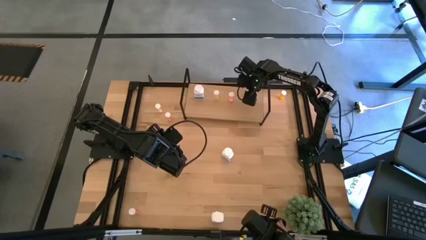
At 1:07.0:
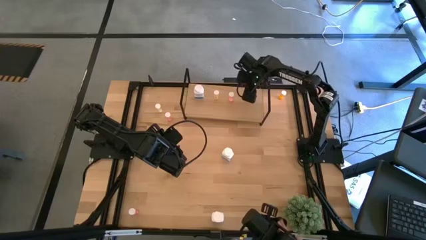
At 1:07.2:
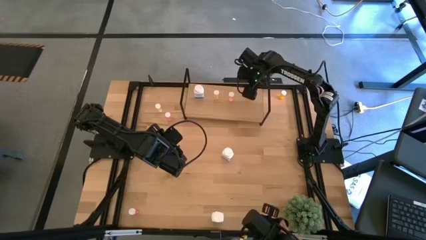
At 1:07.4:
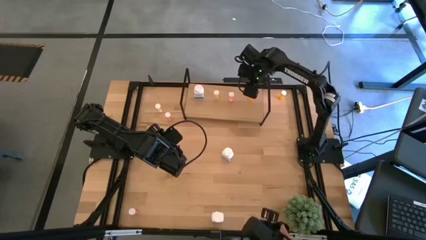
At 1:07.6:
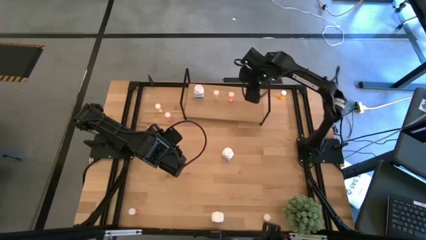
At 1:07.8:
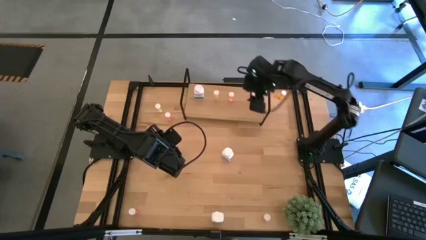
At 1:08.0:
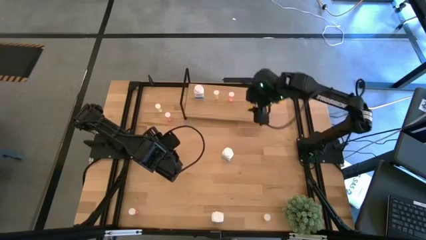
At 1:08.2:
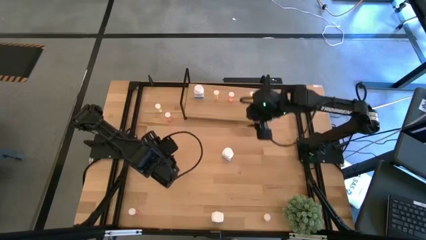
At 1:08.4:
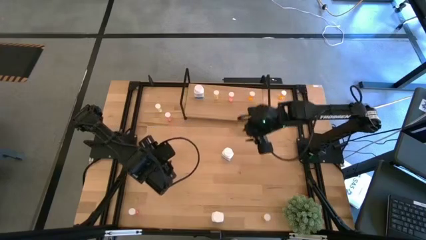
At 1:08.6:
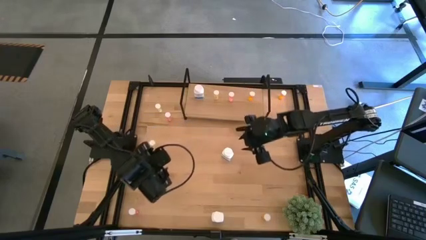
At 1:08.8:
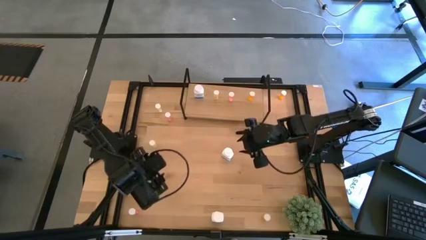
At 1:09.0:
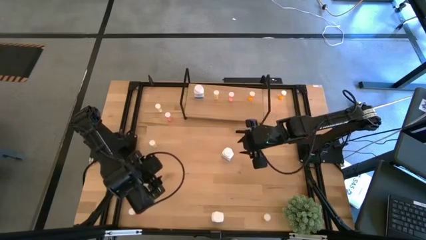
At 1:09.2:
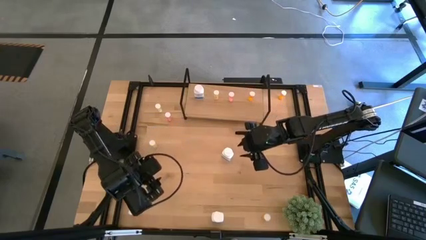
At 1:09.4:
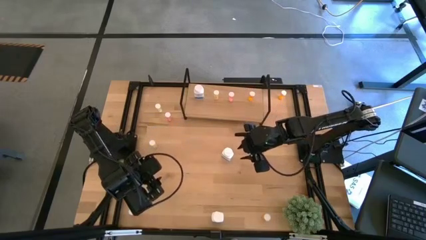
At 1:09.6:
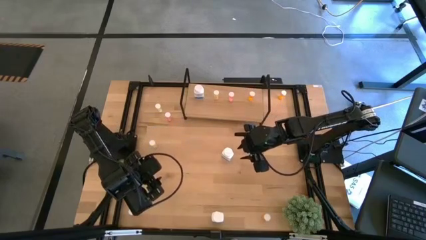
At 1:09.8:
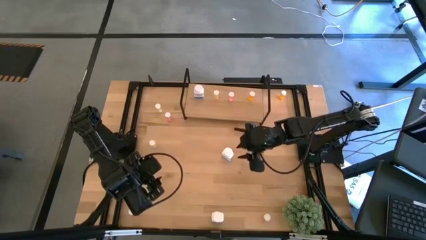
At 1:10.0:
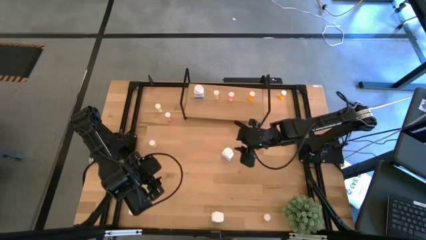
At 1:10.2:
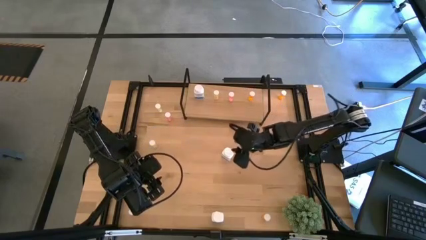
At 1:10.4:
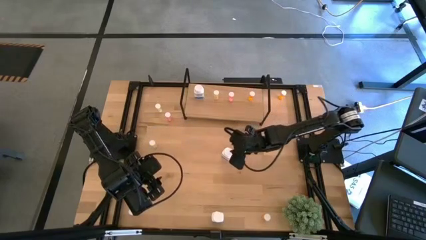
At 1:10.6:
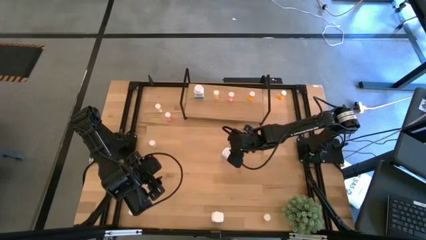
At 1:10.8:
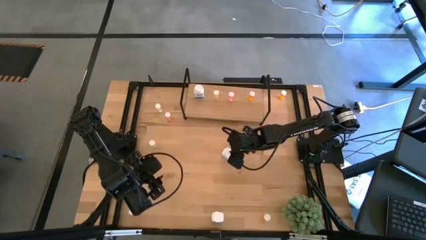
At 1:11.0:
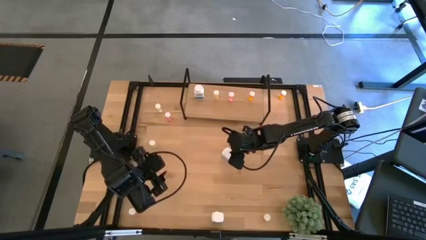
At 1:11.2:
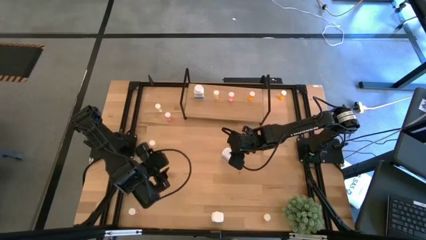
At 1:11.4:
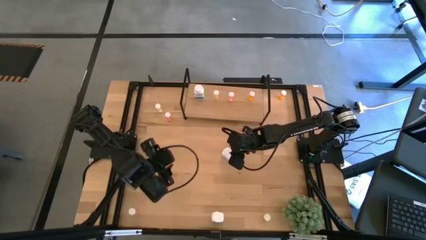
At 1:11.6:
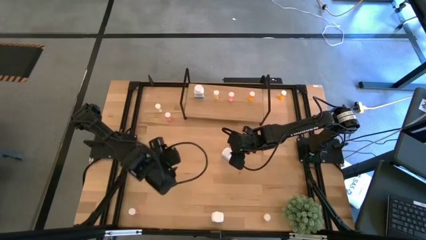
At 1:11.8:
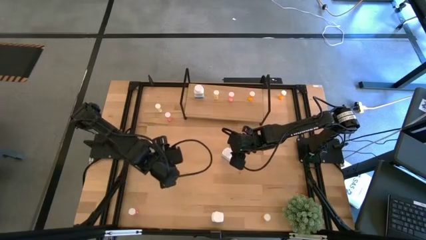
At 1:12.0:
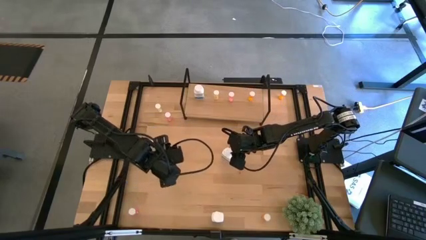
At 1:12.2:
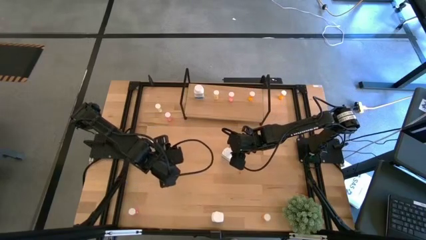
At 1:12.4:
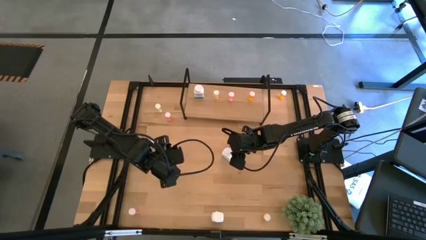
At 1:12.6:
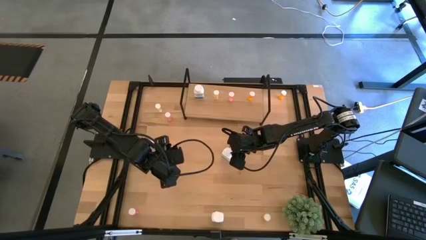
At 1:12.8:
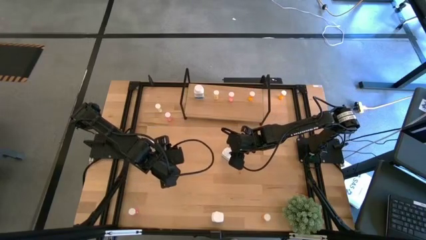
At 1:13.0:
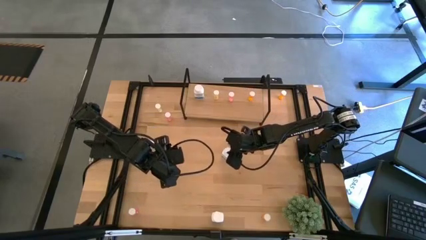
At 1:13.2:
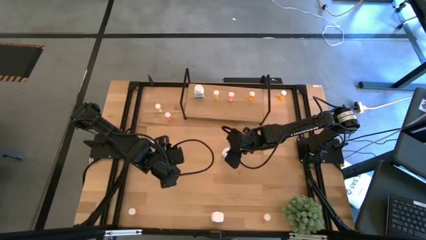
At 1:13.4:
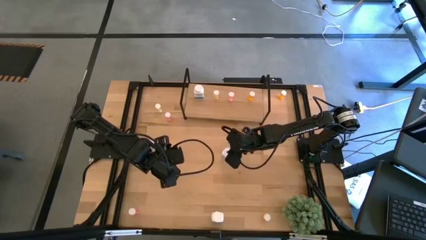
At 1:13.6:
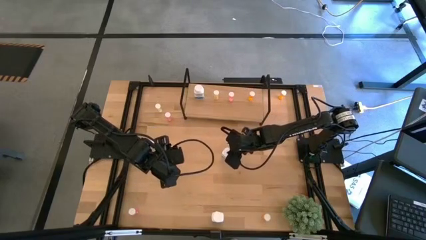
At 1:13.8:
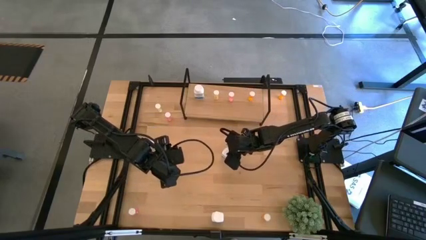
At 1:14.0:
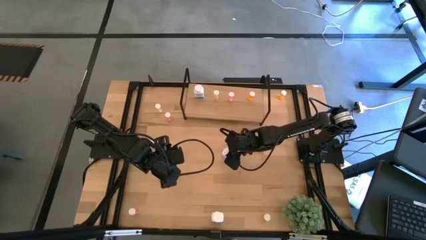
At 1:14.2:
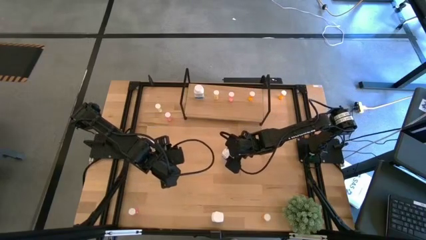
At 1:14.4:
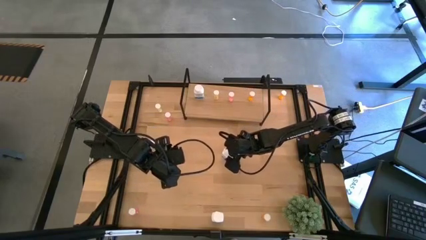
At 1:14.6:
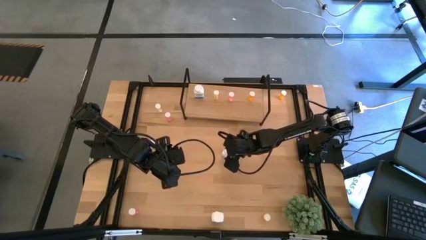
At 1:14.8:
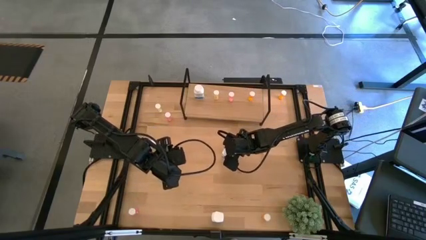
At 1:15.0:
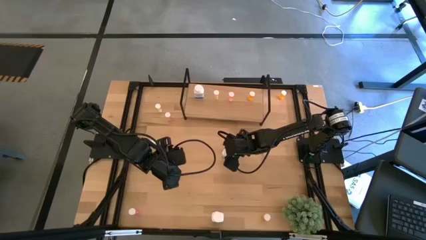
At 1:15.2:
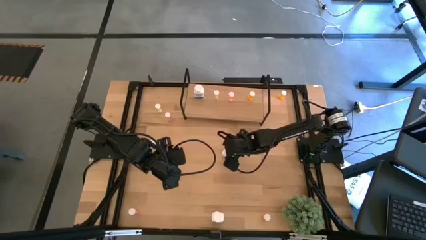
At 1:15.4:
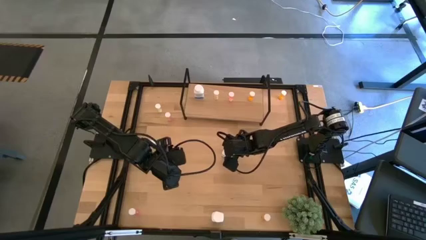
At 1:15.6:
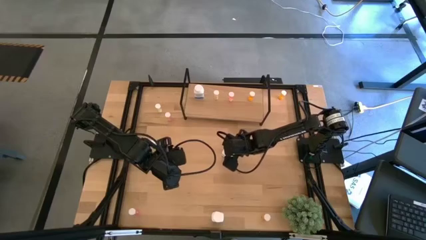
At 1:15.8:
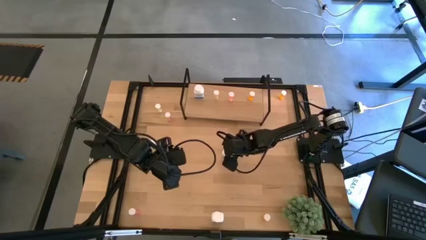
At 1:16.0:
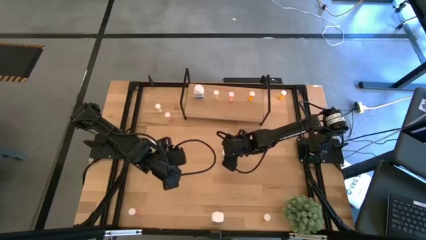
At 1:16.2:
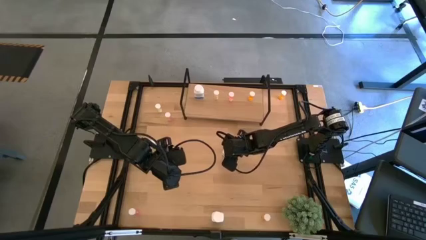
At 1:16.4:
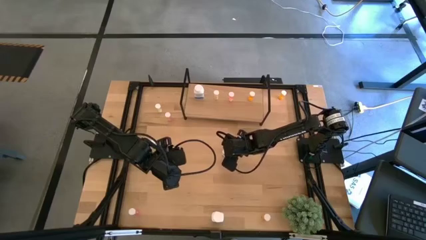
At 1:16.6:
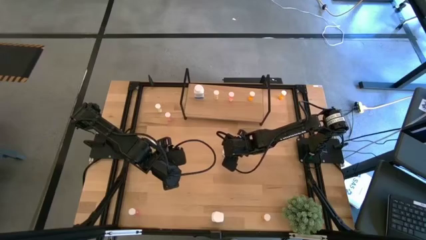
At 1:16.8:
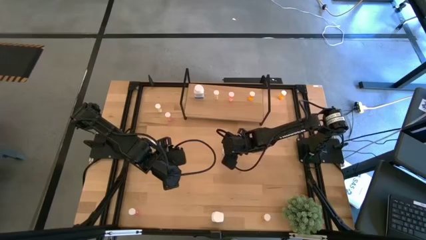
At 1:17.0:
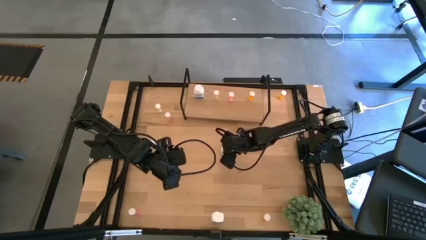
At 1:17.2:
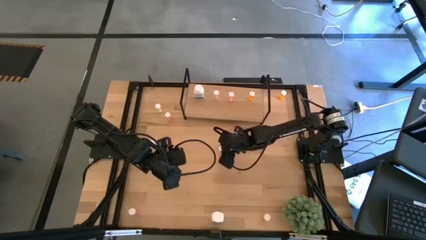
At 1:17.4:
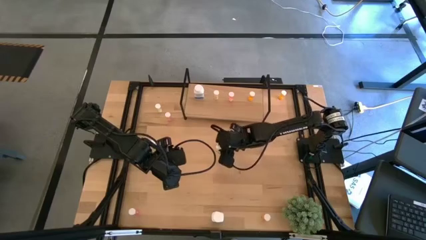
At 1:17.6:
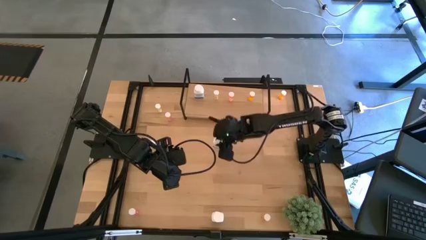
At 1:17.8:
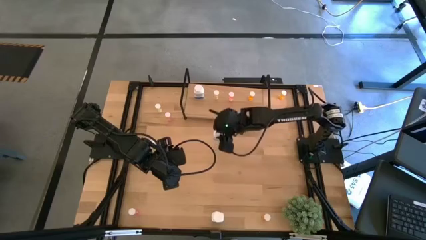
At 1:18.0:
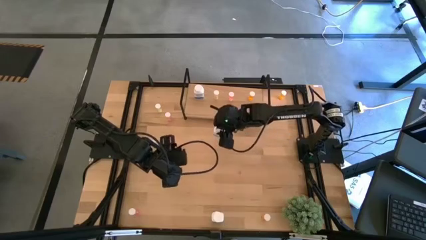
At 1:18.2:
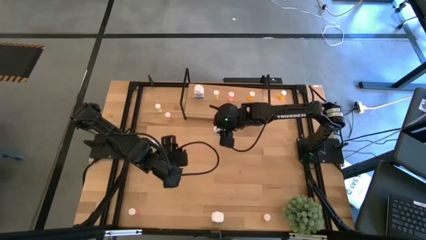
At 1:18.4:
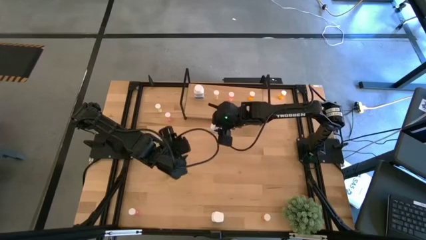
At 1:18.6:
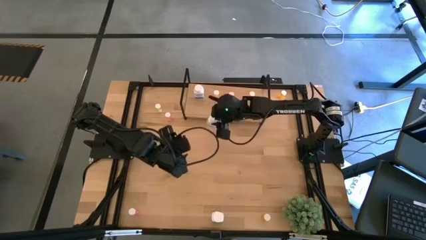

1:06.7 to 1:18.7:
Task: Pick and place medicine bottles onto shelf by color
Put the top white pill bottle on the shelf aligned with the other white pill bottle
